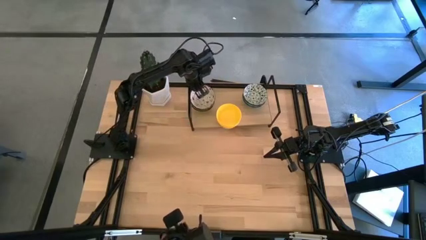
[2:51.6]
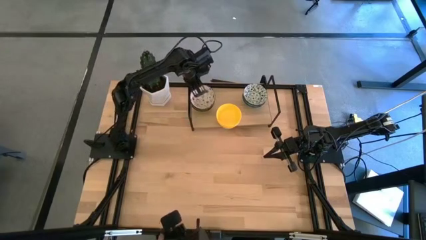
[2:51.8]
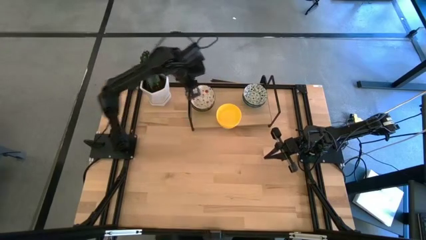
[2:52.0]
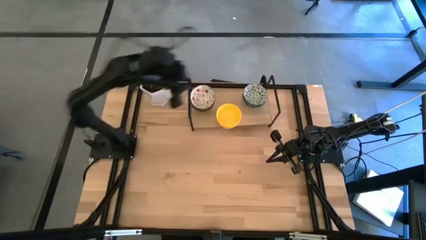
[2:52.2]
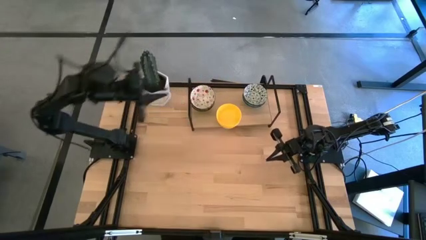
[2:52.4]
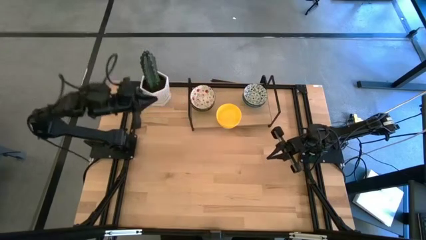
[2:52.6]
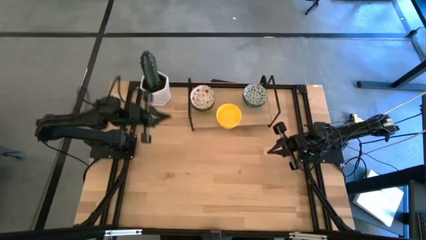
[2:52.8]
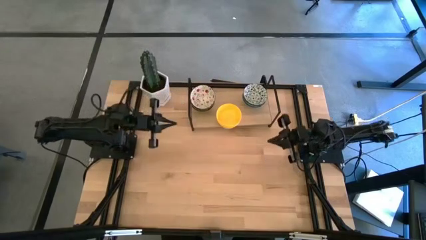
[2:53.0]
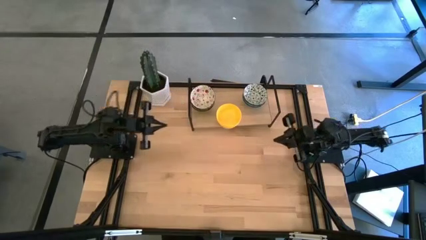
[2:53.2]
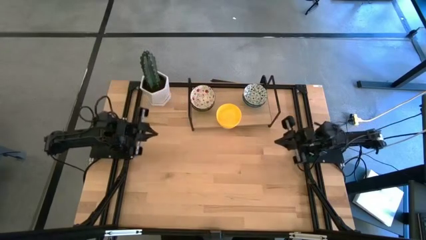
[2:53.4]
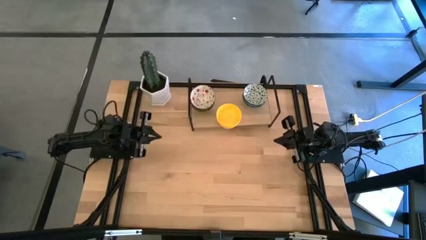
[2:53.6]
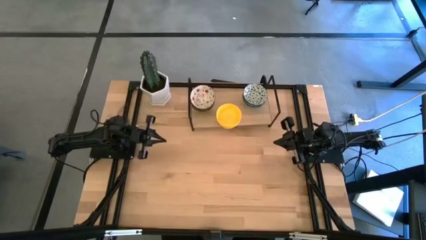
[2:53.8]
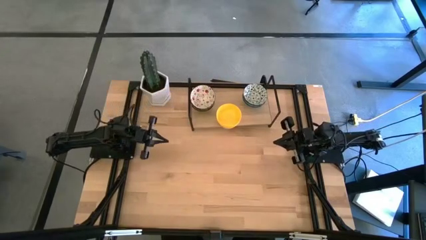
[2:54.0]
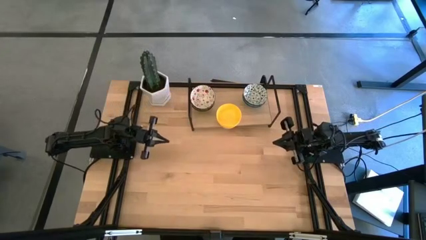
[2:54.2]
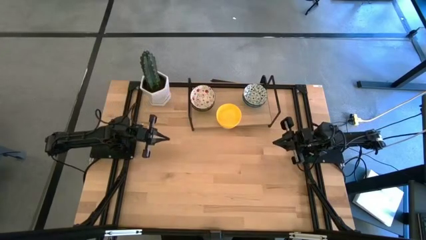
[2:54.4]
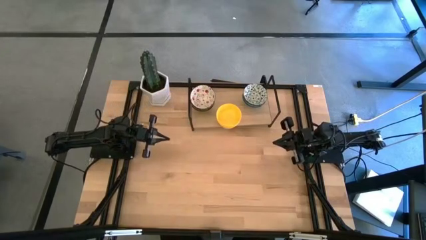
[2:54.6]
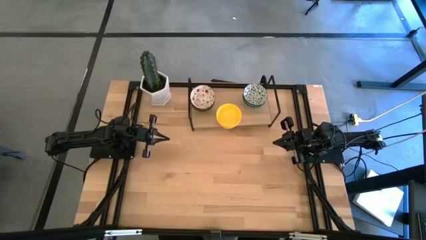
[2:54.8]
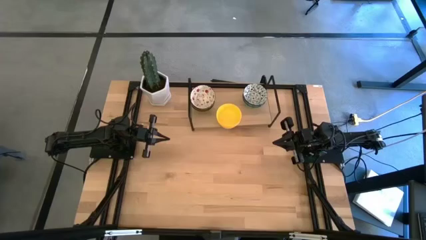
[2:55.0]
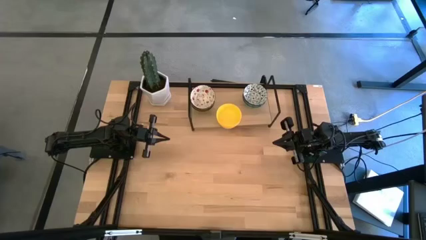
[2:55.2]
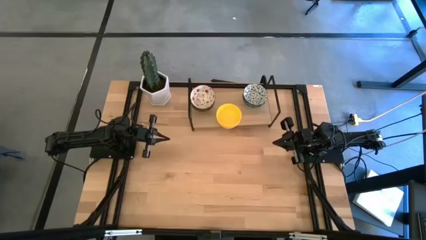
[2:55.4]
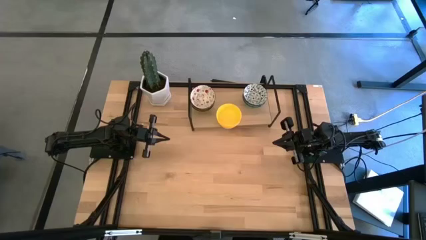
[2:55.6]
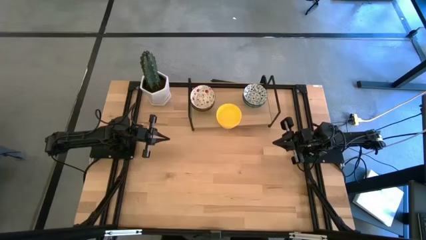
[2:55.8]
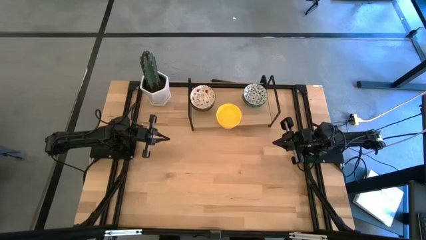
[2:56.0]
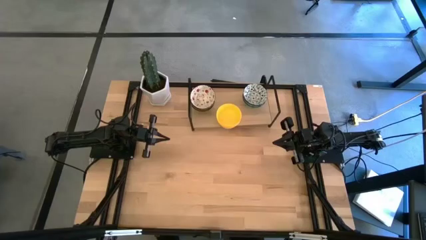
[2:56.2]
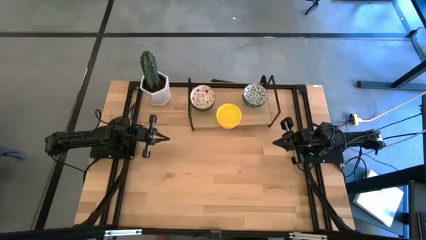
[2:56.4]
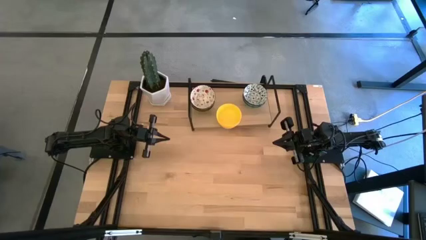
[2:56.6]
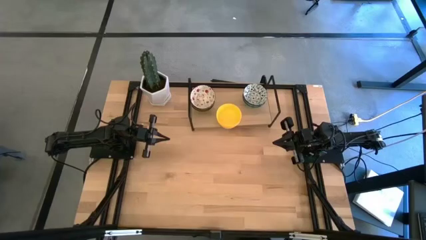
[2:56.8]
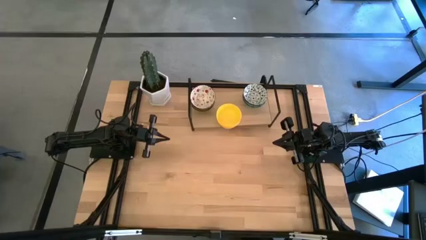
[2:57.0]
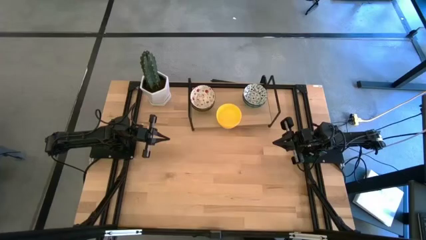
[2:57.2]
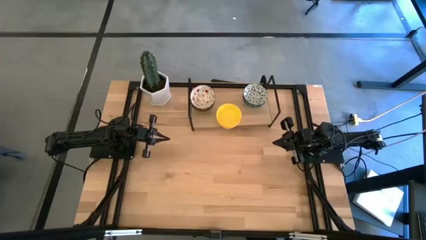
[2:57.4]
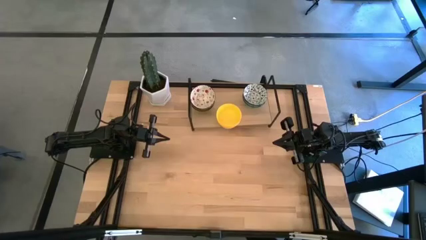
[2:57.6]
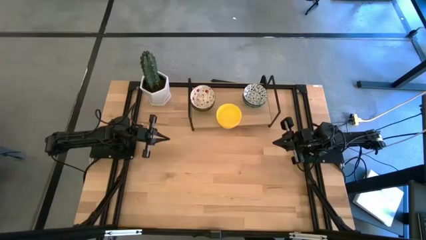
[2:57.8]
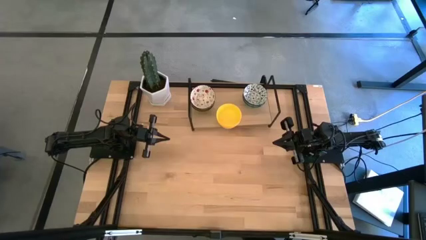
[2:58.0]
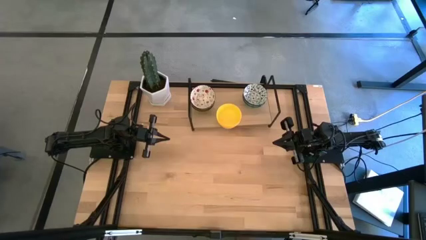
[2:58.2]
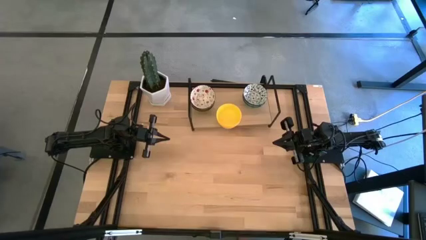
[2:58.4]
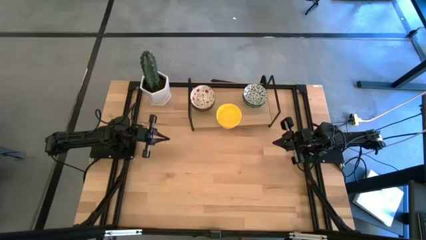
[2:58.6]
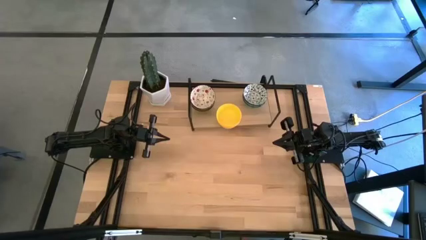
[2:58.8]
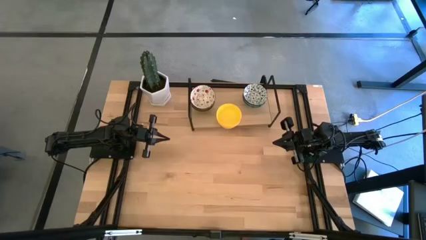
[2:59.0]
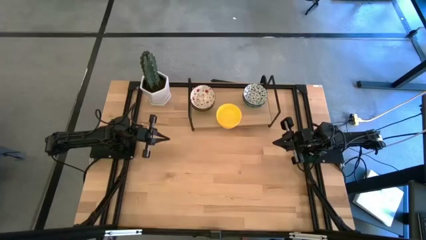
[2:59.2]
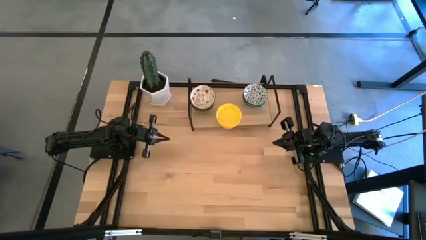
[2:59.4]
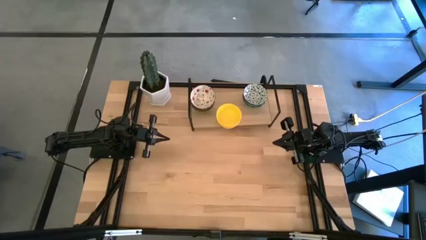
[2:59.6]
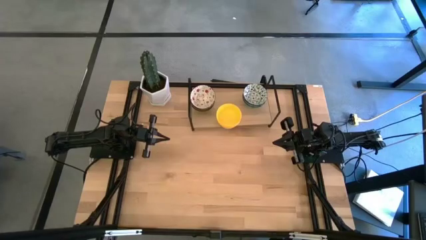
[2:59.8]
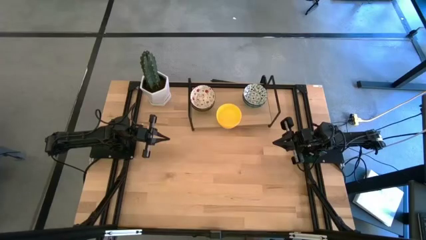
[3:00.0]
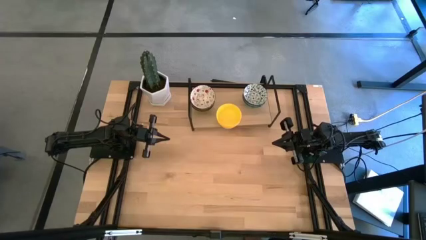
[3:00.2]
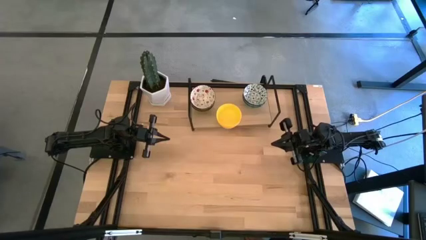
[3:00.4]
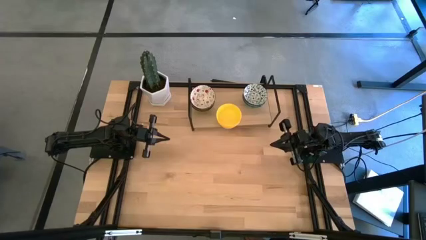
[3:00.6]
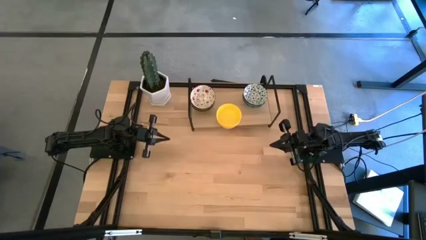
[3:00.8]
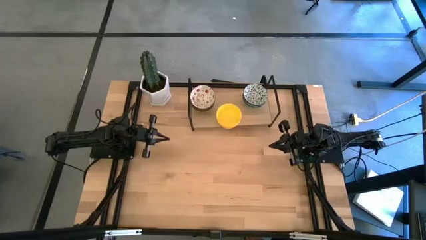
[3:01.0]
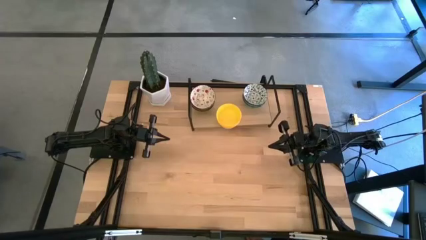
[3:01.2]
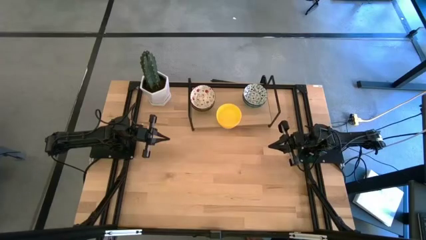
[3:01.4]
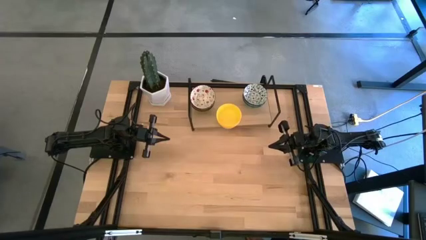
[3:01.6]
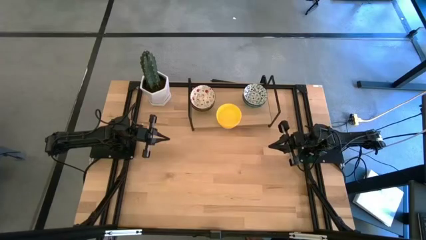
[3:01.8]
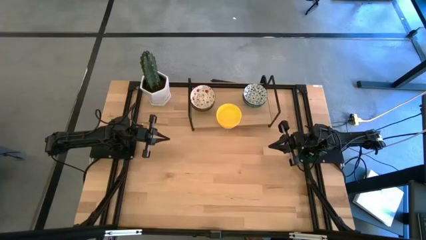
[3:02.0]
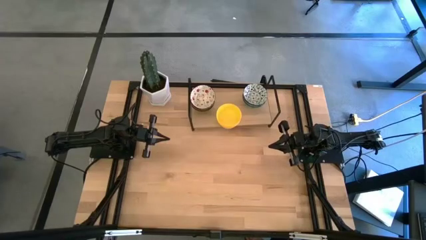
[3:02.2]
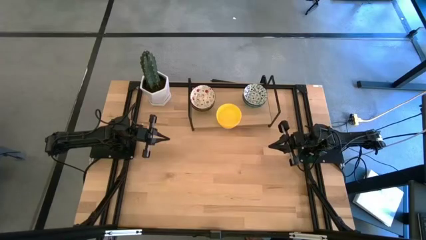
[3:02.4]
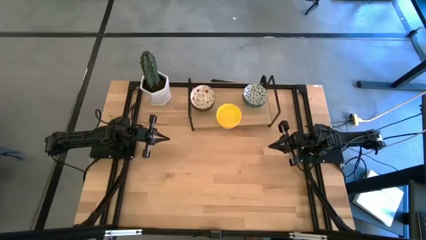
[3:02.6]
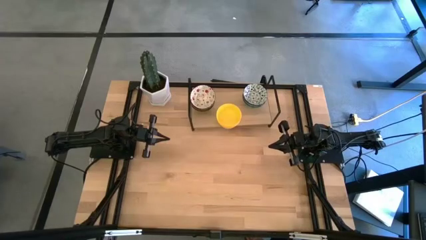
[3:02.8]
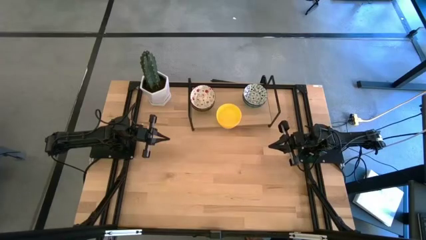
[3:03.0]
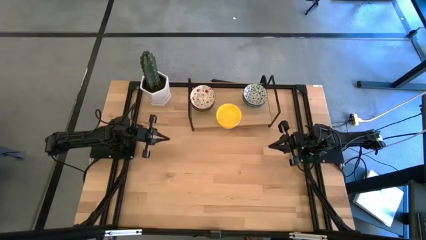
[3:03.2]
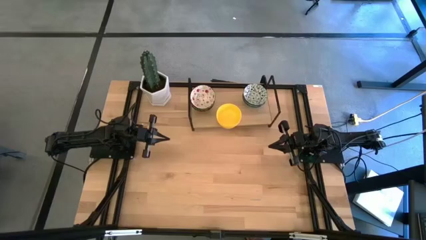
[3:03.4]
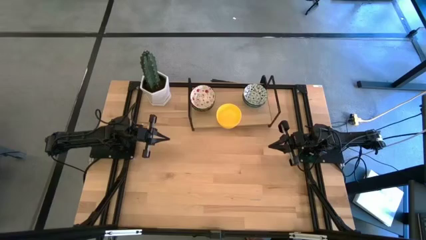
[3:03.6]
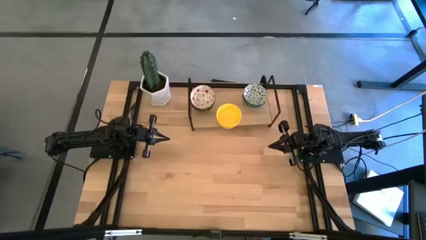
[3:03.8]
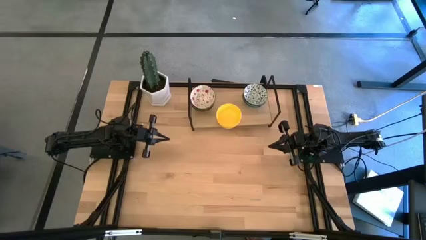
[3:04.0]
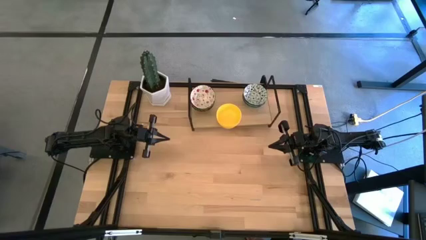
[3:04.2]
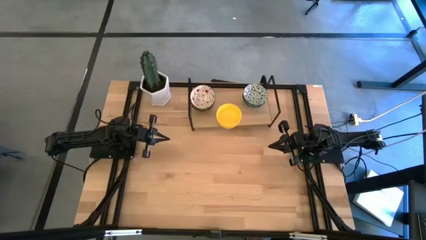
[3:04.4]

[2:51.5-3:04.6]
Task: Pick & Place Mini bowls
Return to Home Position
